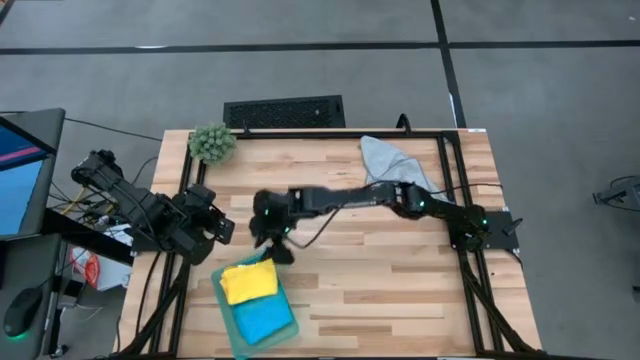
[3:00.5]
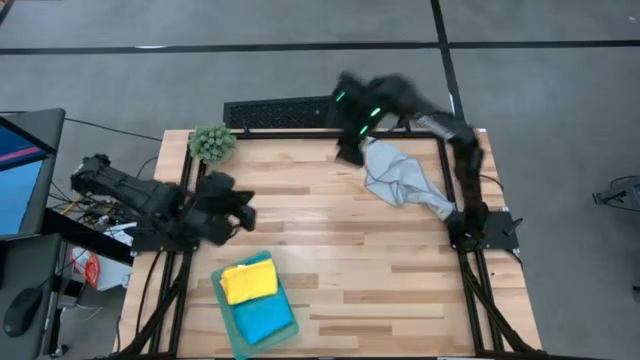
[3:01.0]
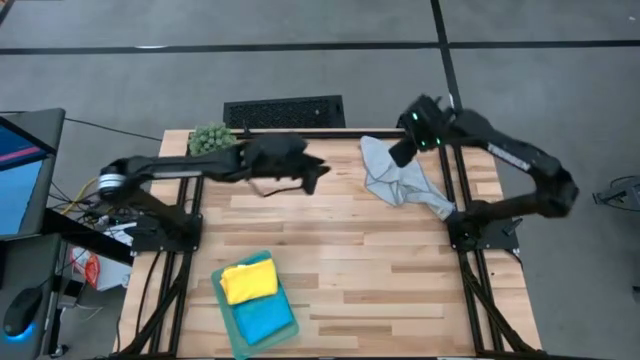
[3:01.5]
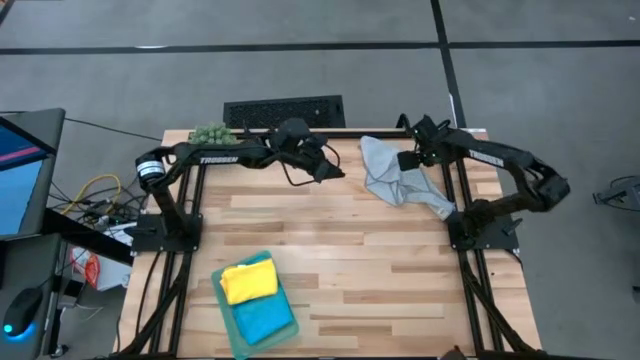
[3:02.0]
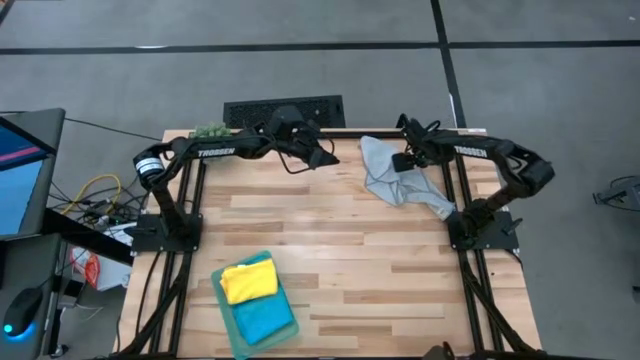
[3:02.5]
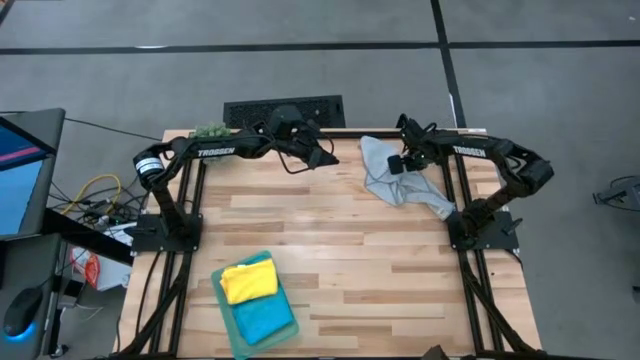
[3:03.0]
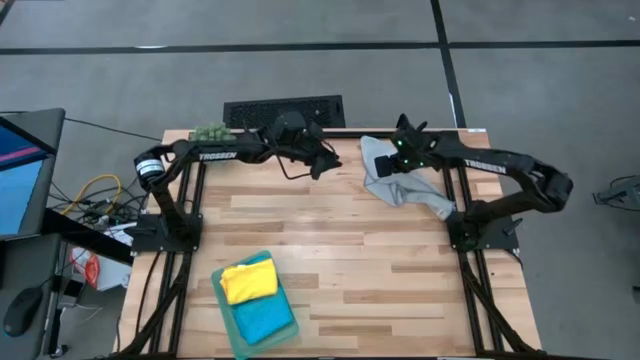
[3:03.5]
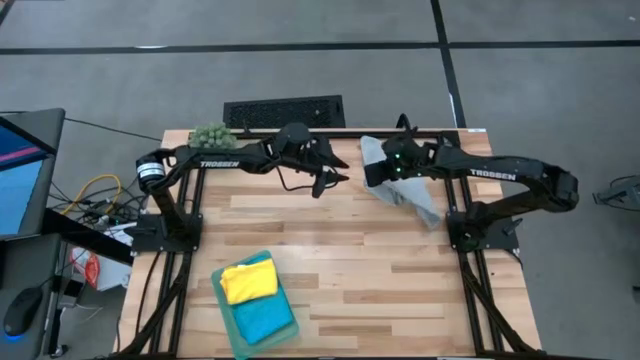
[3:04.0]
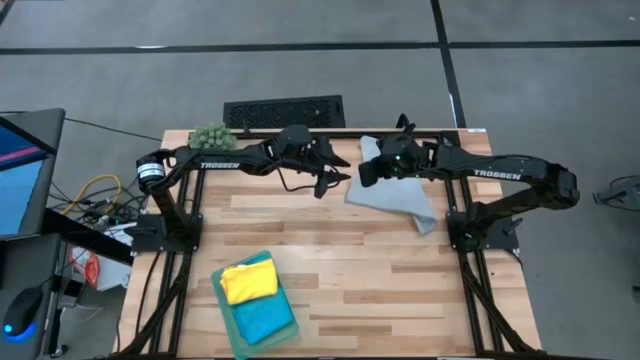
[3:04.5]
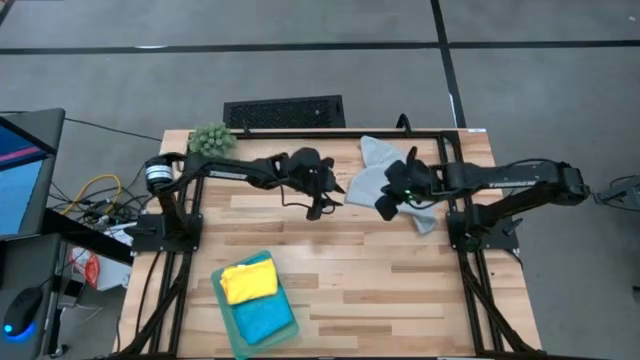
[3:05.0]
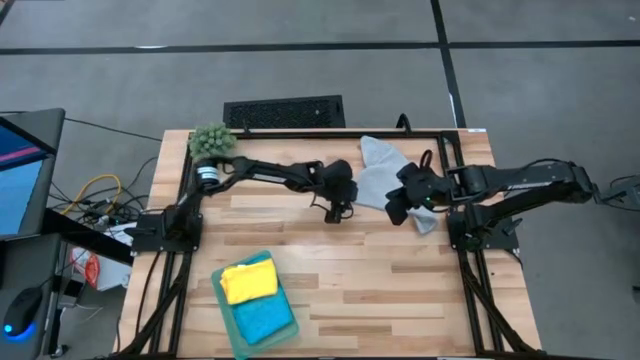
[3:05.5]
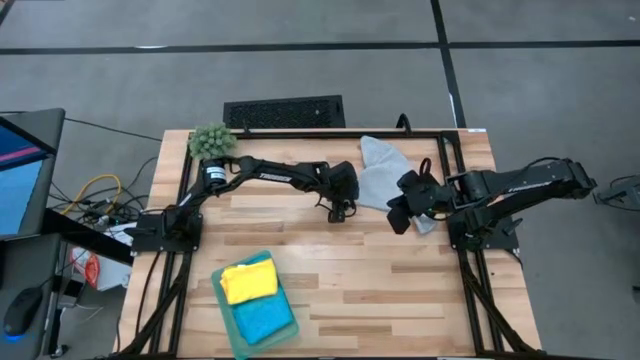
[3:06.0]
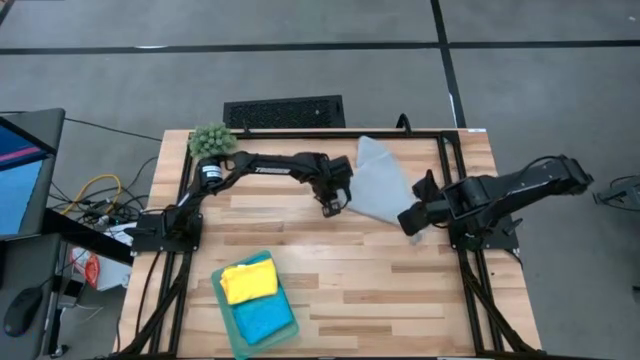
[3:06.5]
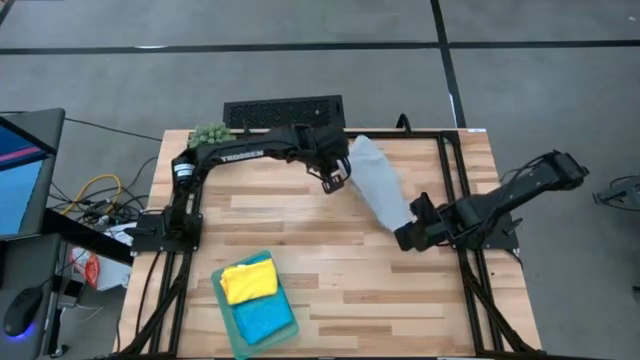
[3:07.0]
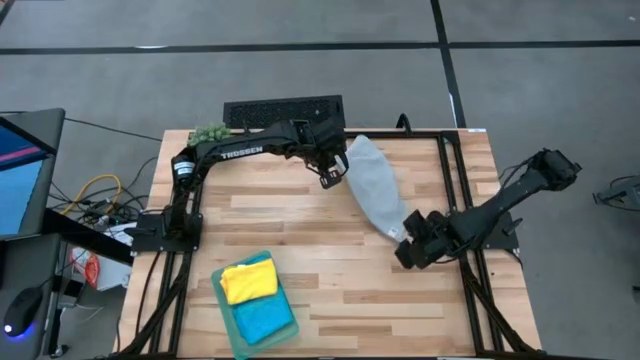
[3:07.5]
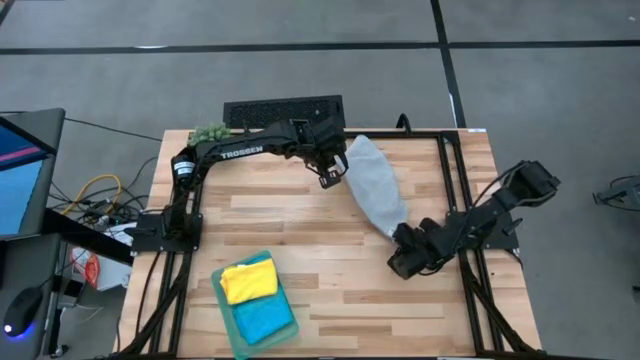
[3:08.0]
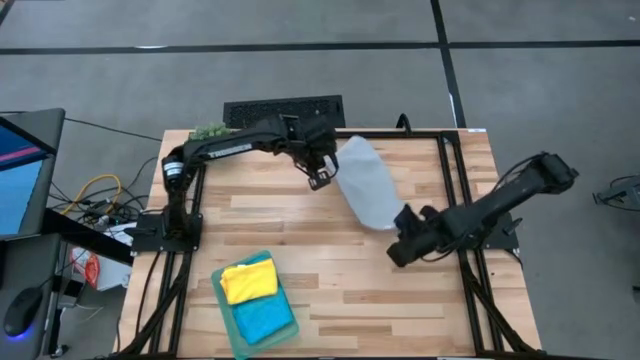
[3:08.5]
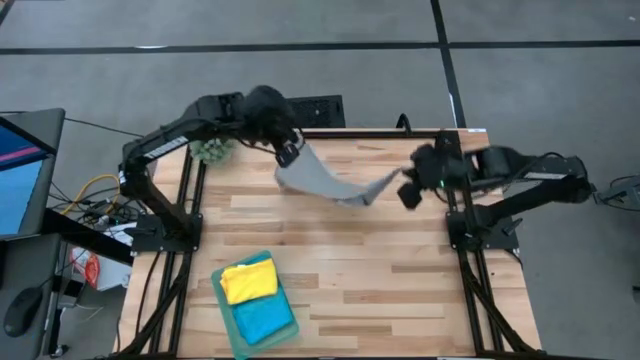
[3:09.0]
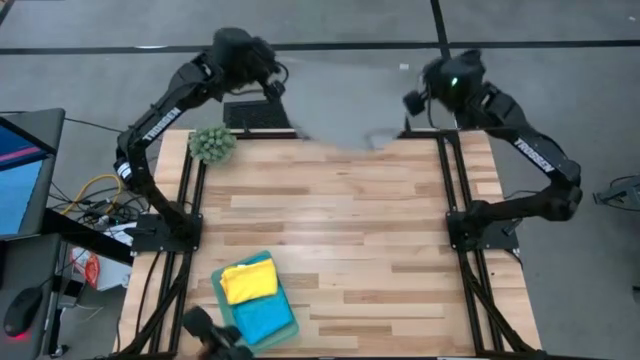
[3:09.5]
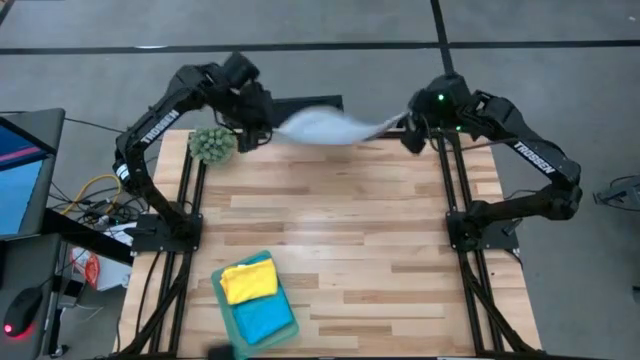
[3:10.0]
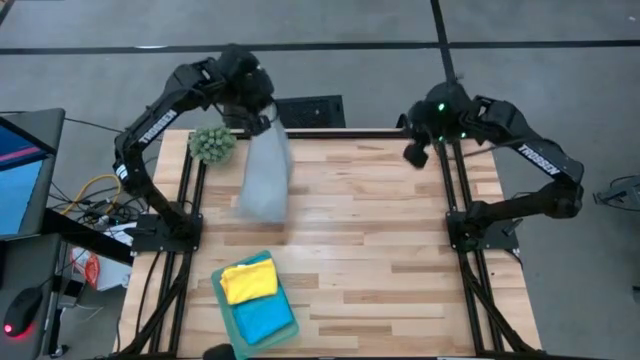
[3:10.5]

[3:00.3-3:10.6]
Task: Fold microfiber towels
Fold the gray towel and put into the bin

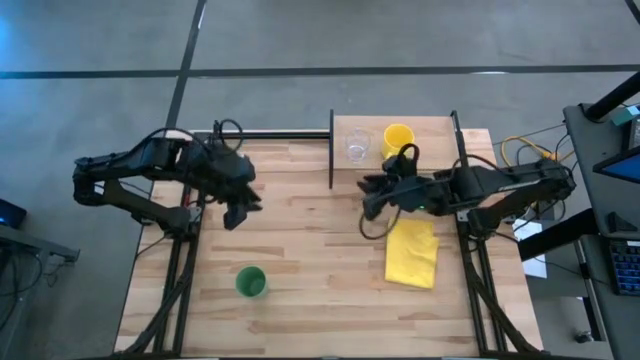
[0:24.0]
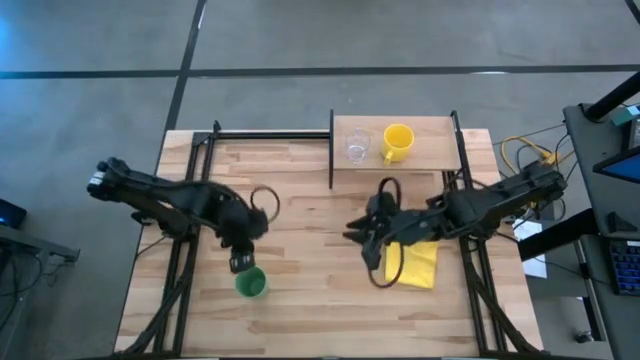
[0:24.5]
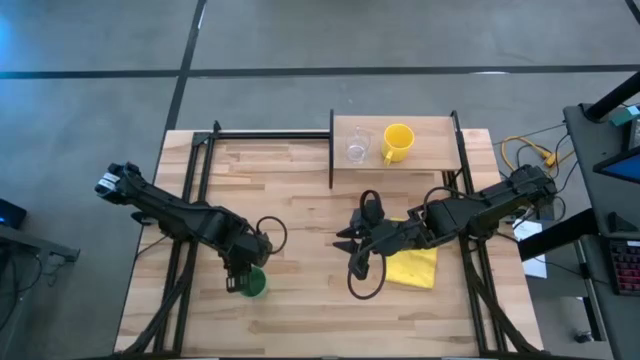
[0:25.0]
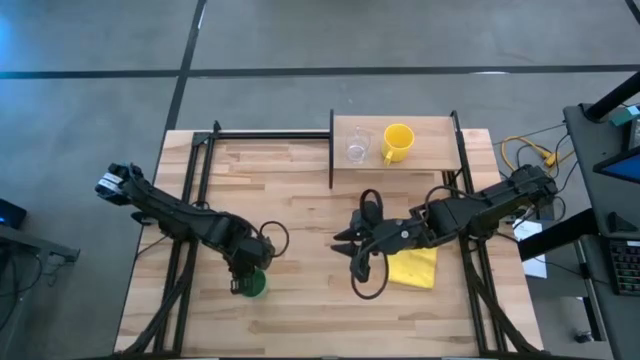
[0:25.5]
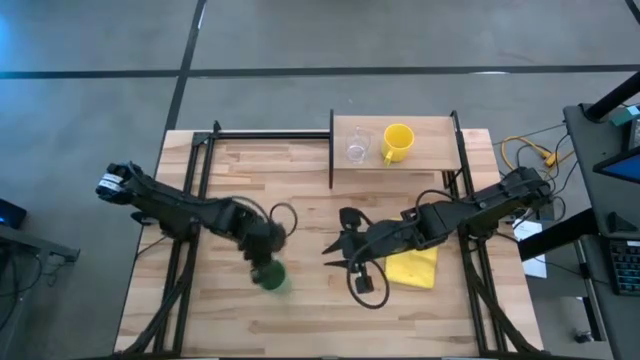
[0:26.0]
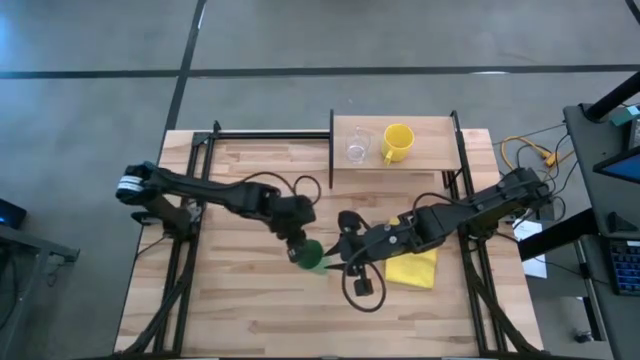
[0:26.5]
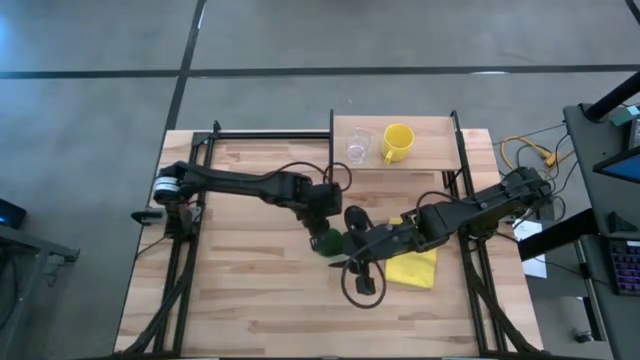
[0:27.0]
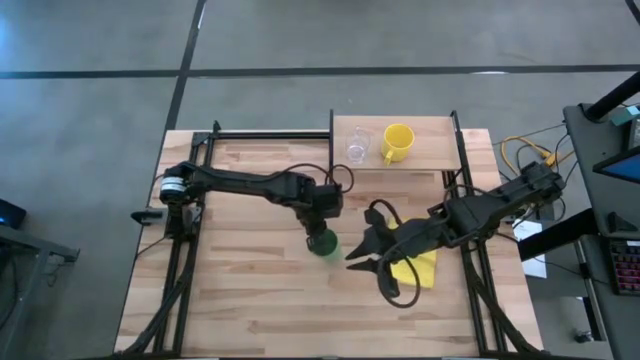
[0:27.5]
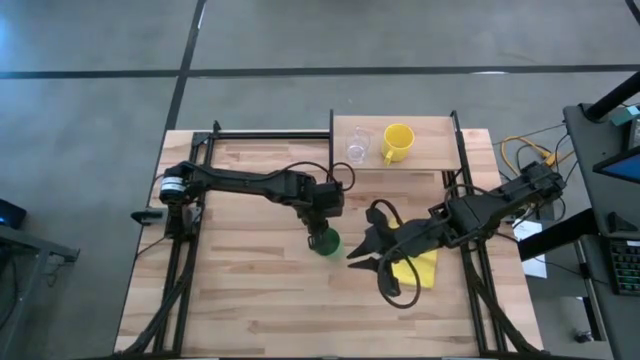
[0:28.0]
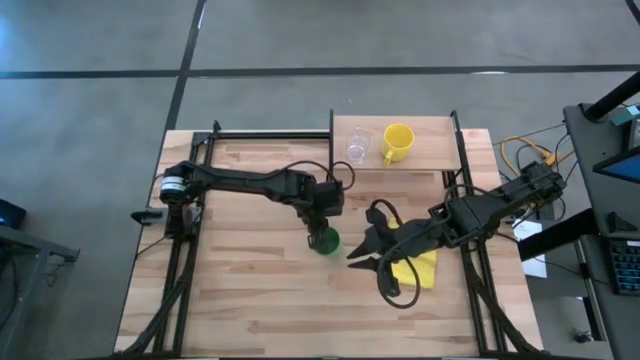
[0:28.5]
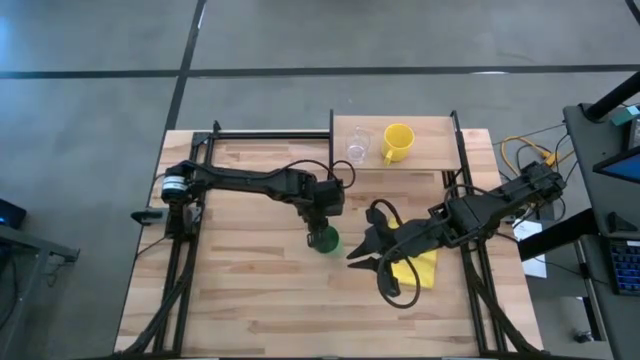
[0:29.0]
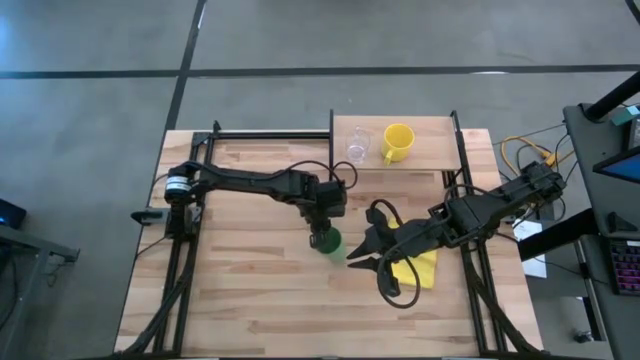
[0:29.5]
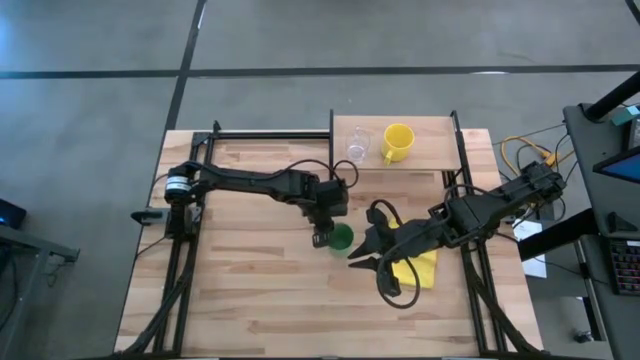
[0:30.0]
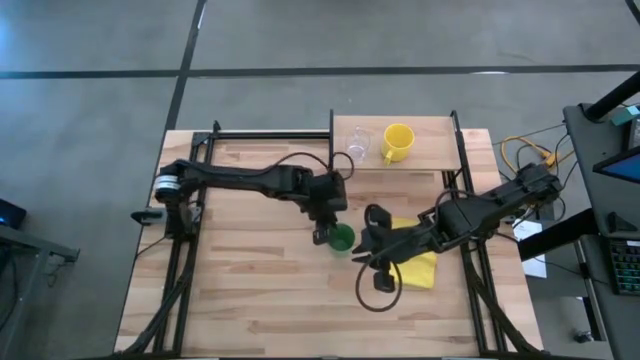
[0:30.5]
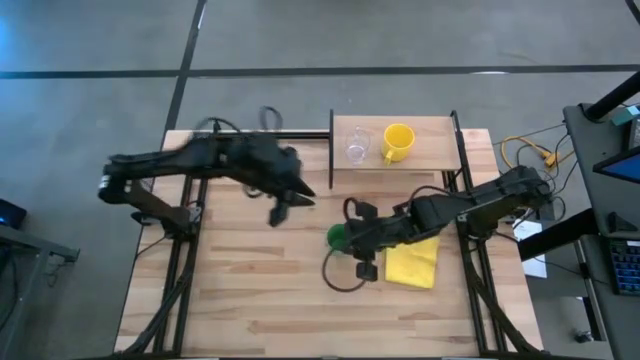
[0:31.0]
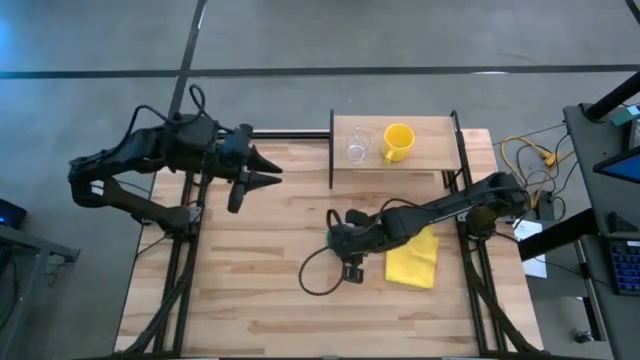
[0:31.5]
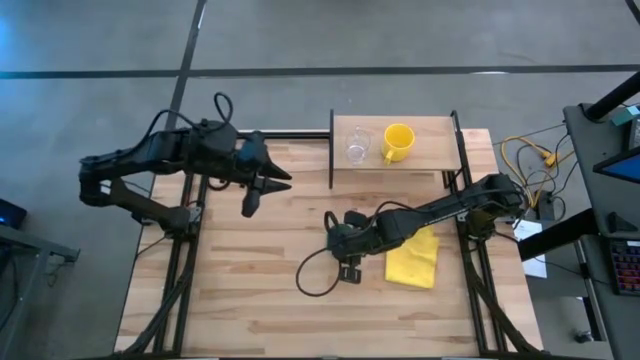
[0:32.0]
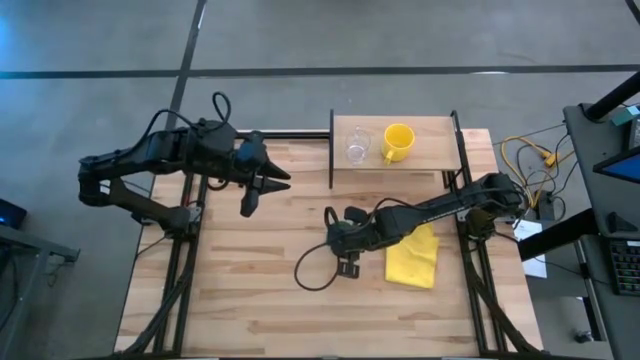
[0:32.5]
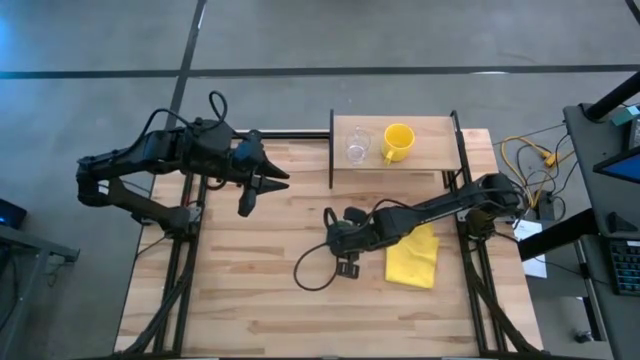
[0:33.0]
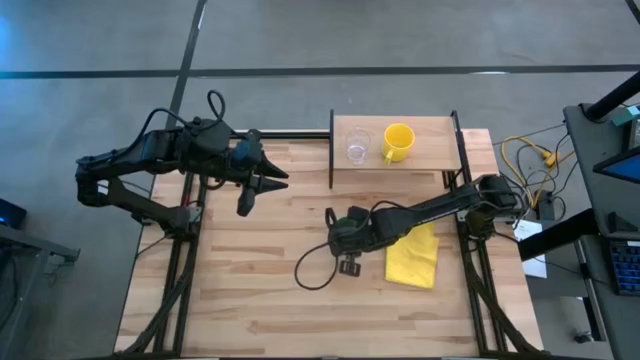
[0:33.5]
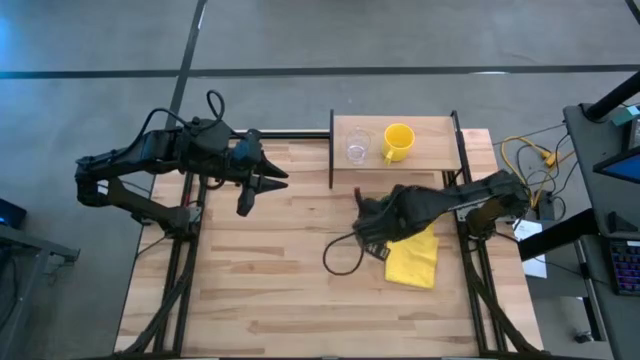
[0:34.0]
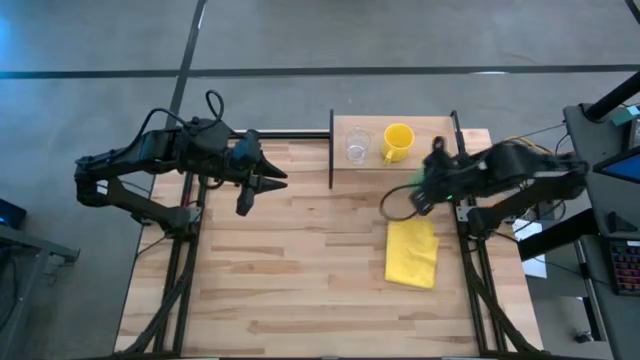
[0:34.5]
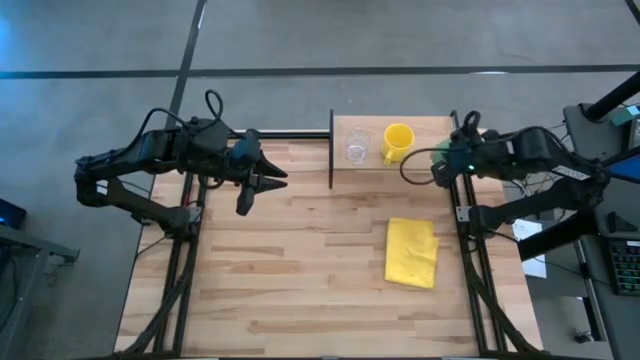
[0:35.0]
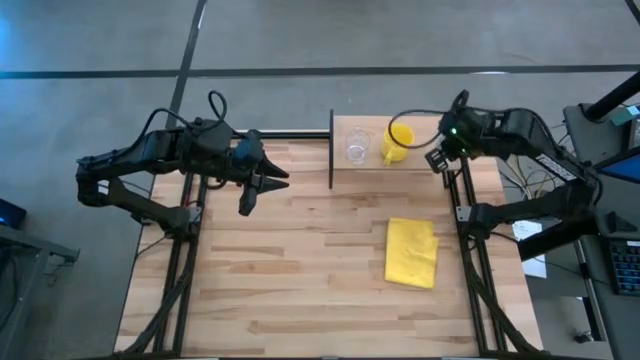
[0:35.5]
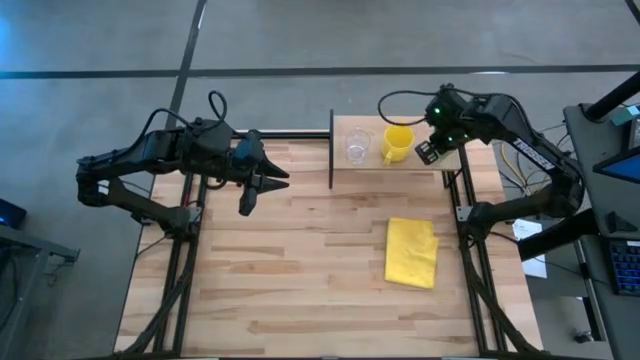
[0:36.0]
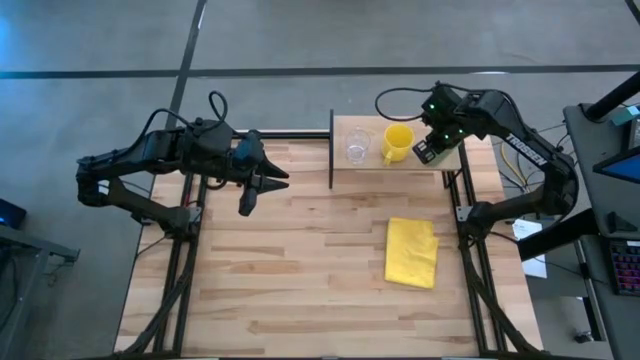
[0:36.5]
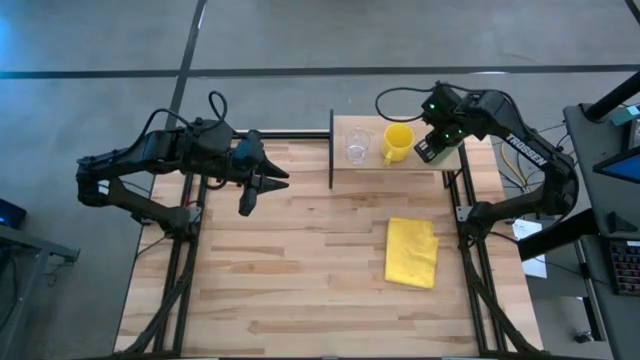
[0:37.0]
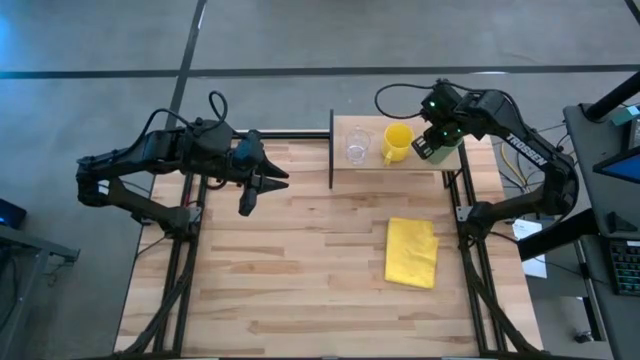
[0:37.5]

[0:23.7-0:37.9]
Task: Stack small to large cups/mugs on shelf
Put the green cup on the shelf
